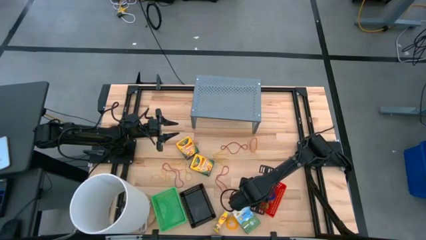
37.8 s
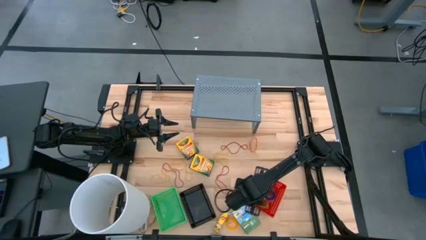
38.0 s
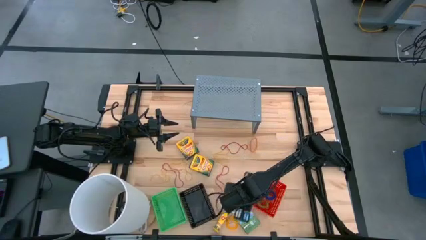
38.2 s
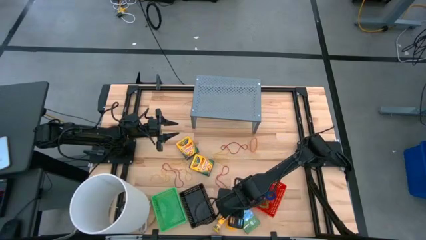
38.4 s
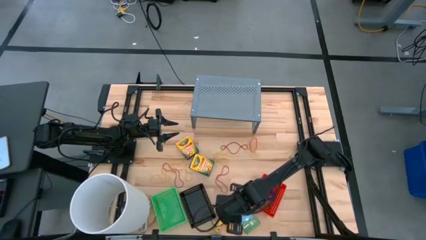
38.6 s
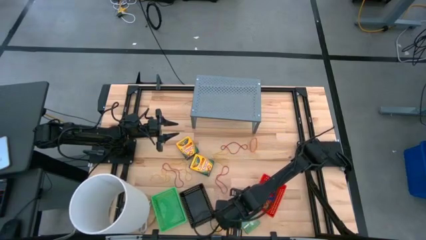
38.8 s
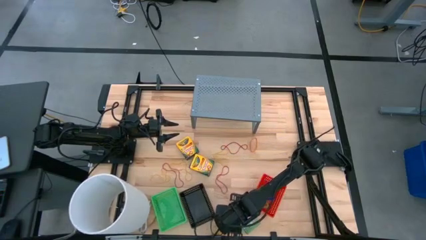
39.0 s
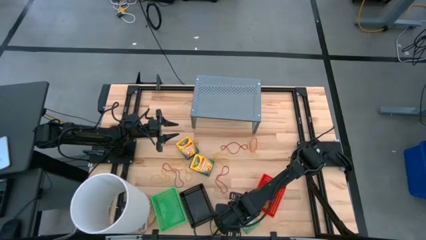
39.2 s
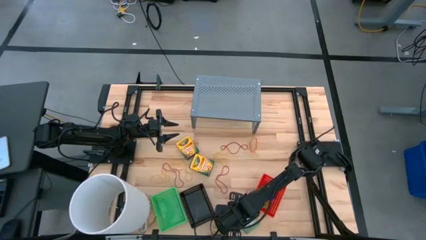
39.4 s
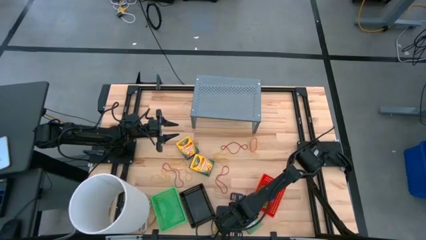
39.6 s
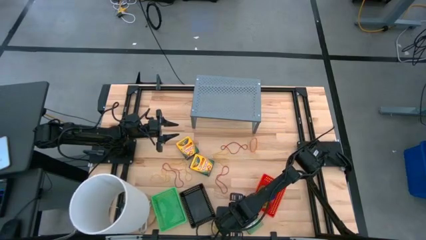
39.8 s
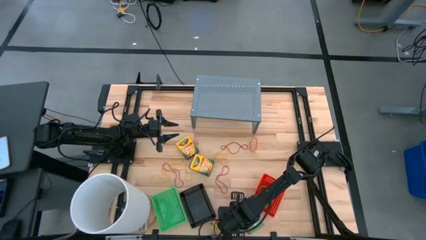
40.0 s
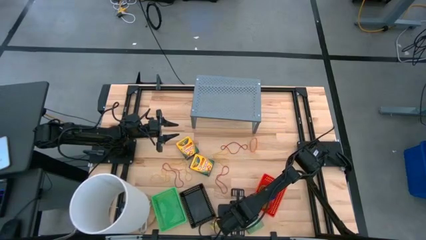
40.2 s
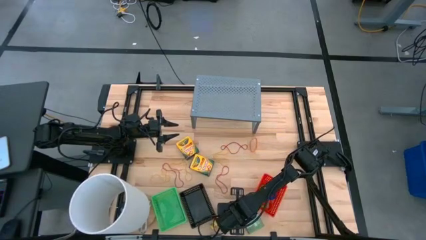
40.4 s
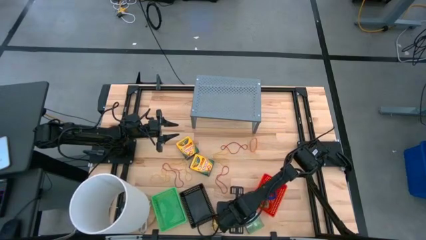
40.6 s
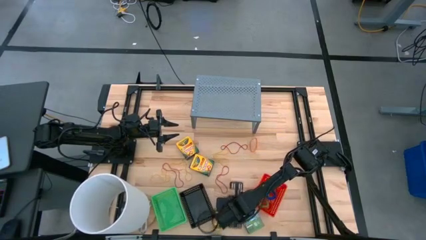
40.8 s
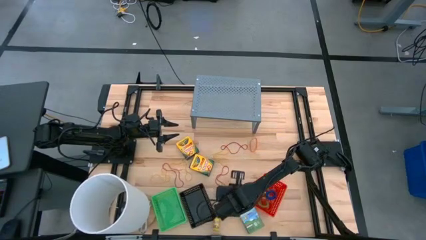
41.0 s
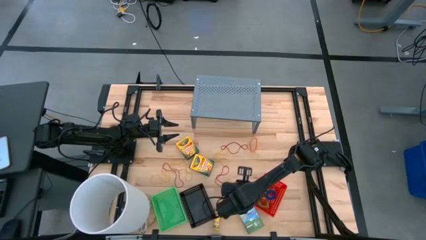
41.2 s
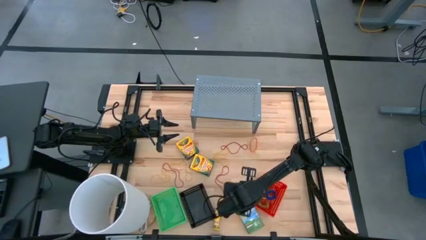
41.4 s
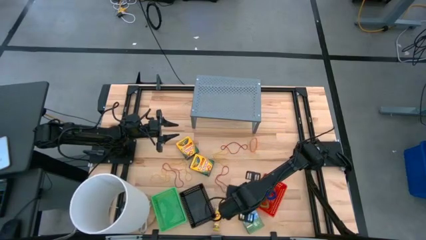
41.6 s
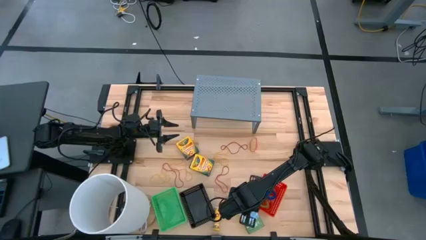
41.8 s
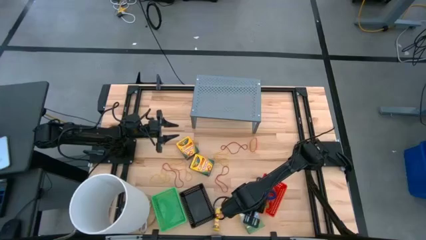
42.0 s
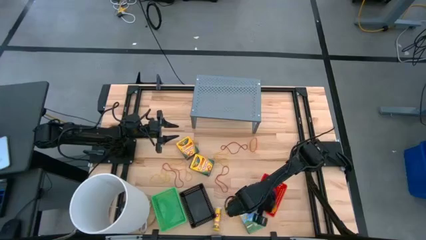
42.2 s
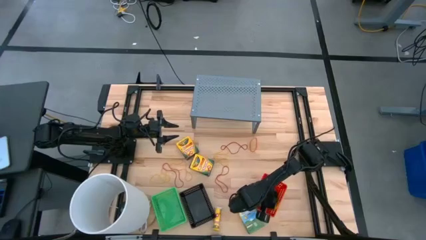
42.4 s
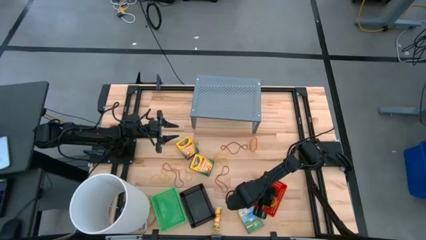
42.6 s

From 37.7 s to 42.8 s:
Task: Pick & Place Office Desk Supplies
Put the yellow spring keychain into the red bin

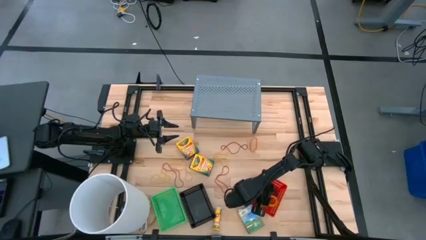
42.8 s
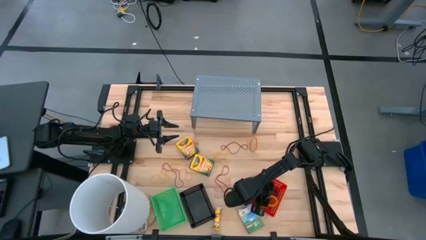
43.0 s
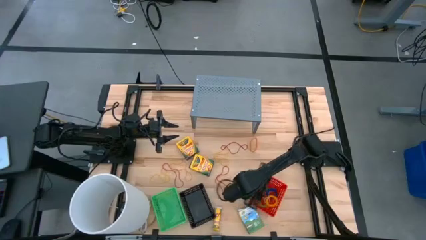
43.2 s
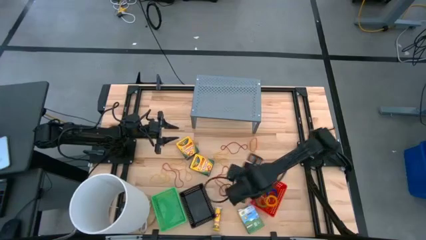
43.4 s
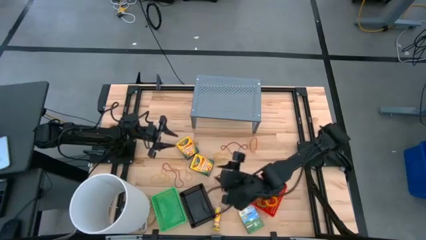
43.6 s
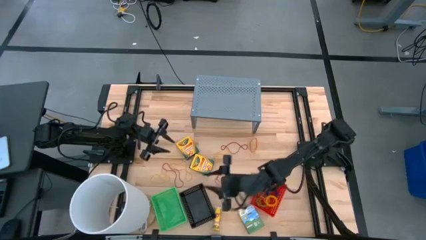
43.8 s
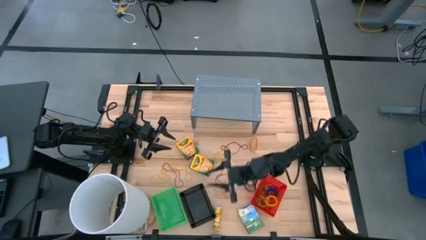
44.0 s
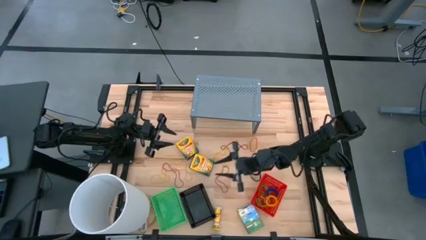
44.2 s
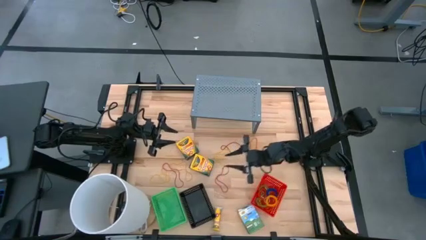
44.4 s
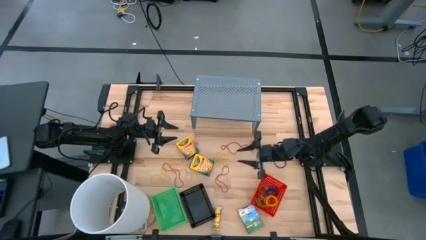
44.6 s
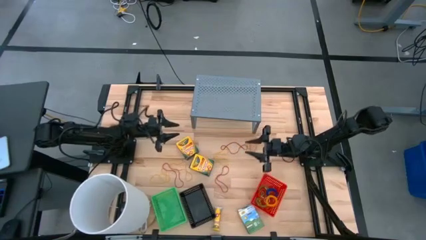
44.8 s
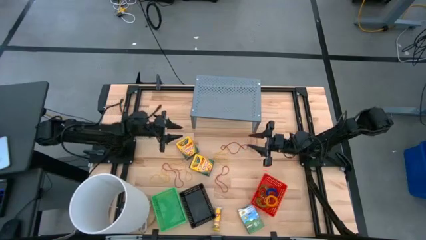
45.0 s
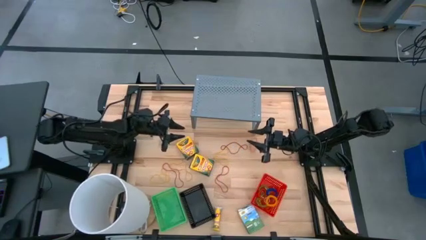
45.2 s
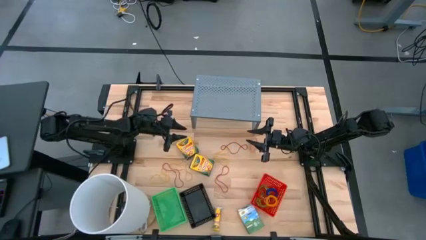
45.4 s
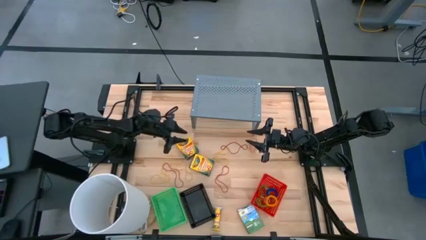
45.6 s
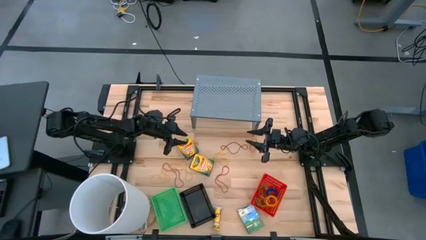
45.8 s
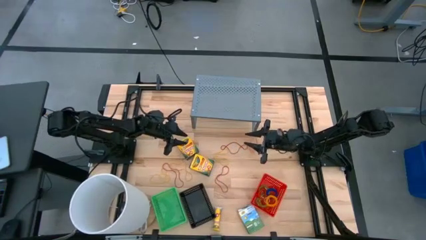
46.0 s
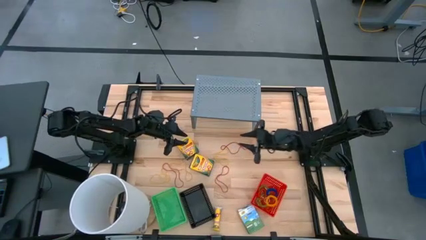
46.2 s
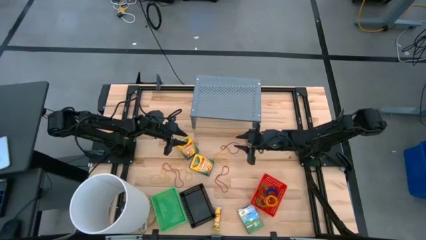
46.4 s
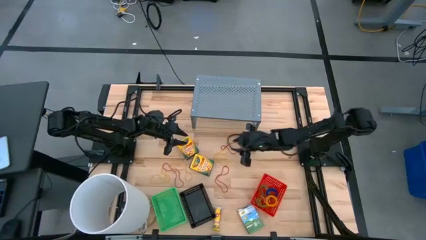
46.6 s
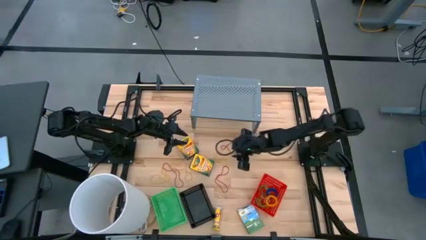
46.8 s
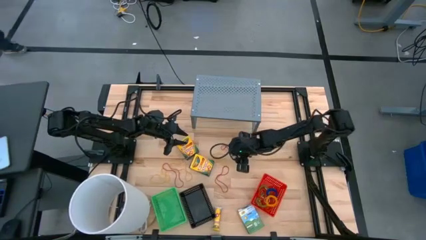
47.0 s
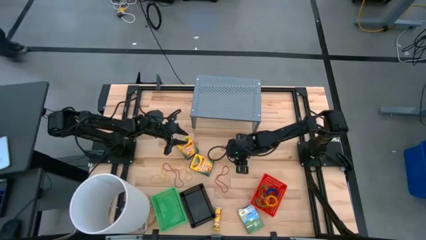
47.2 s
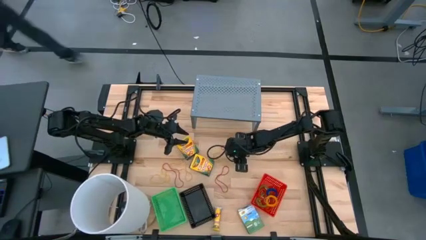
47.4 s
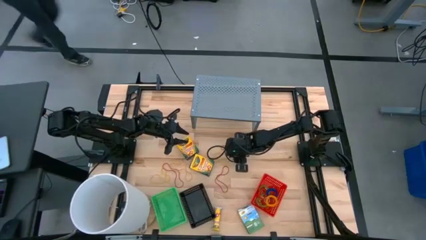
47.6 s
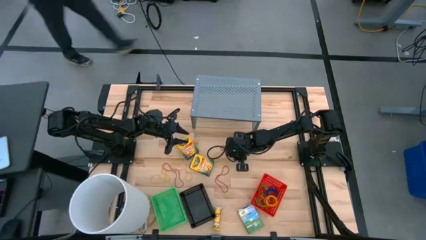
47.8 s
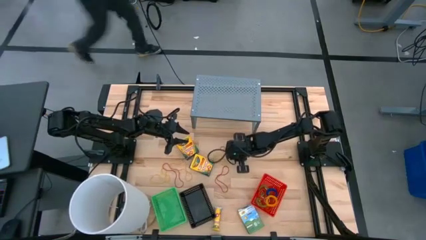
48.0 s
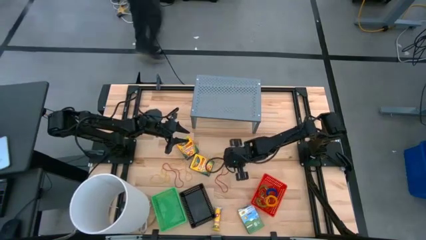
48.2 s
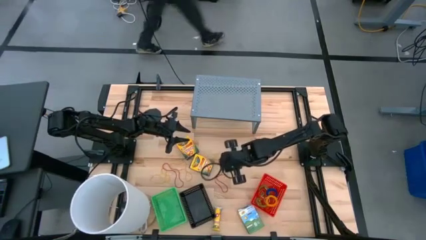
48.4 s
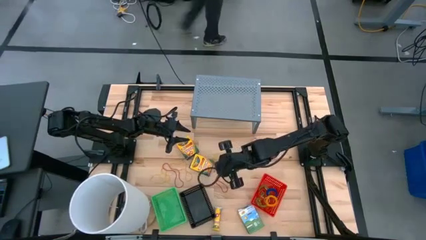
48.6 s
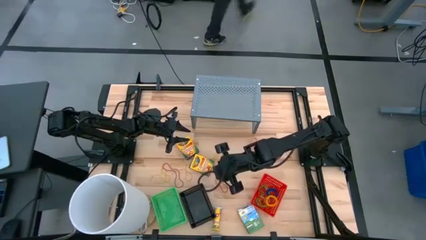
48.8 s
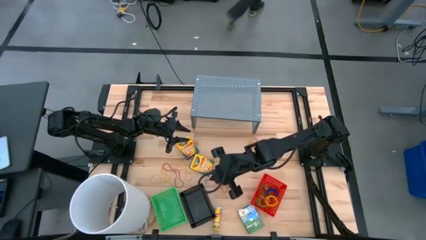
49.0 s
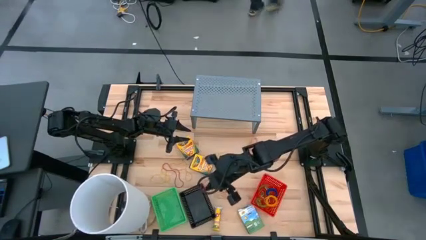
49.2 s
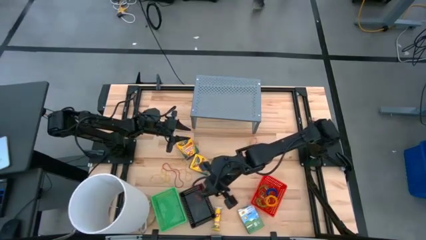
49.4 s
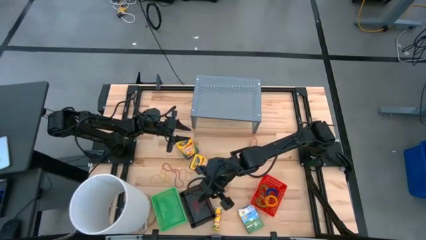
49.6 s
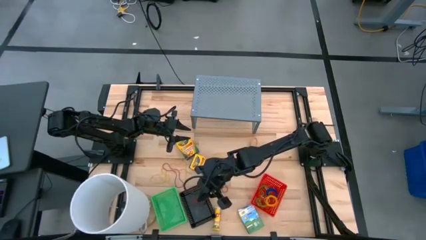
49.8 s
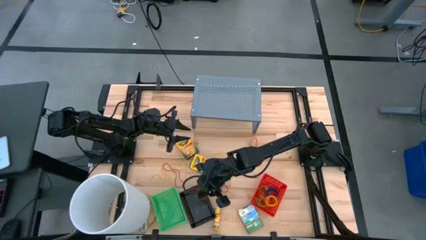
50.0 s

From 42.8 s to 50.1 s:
Put the red rubber band into the black bin

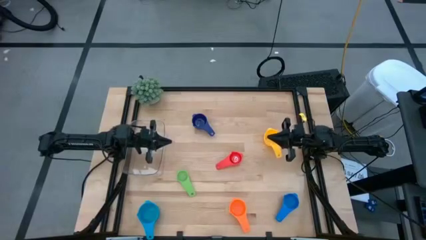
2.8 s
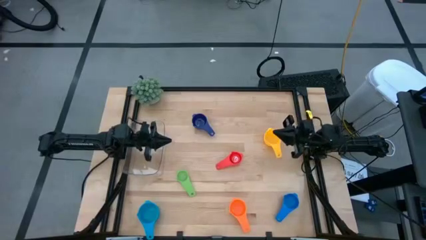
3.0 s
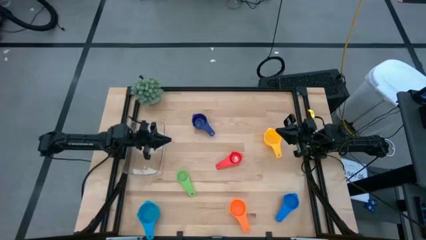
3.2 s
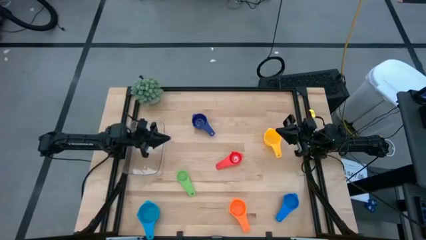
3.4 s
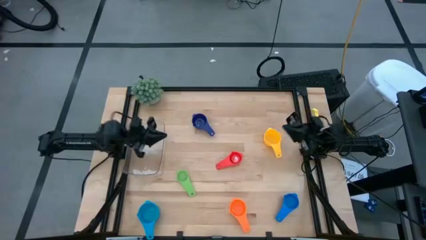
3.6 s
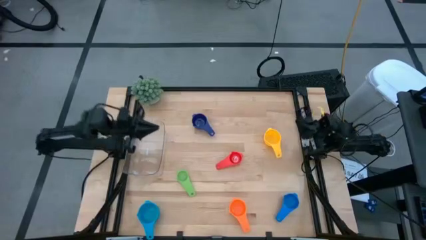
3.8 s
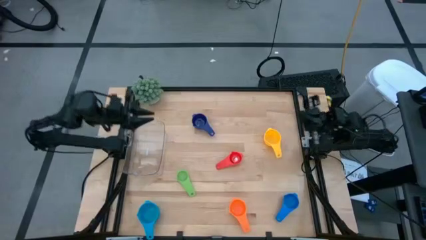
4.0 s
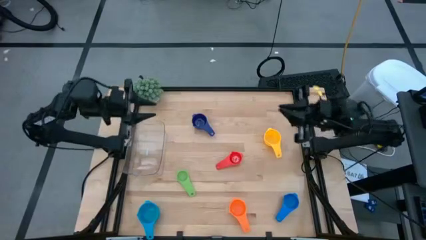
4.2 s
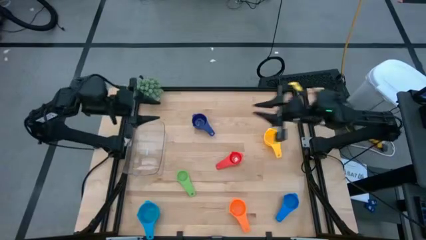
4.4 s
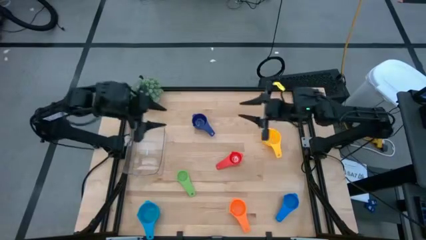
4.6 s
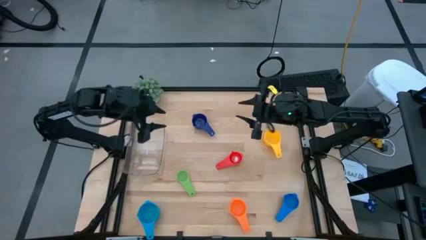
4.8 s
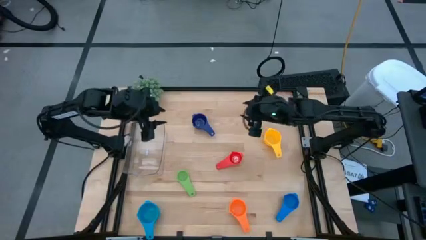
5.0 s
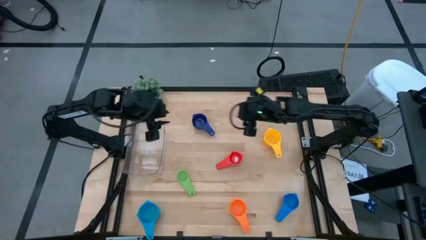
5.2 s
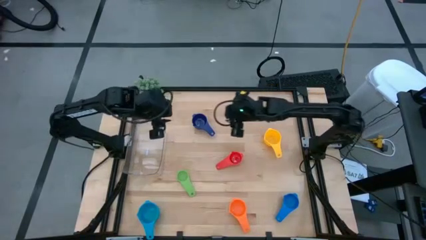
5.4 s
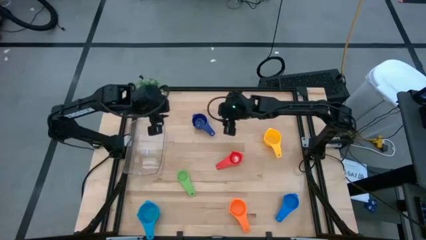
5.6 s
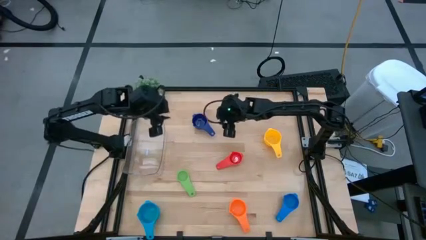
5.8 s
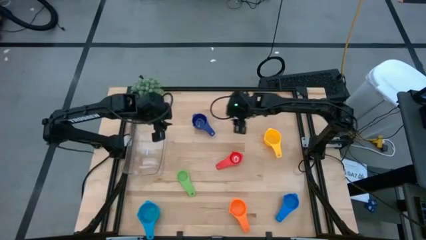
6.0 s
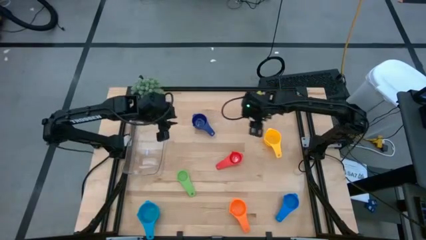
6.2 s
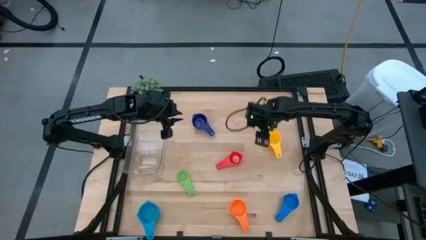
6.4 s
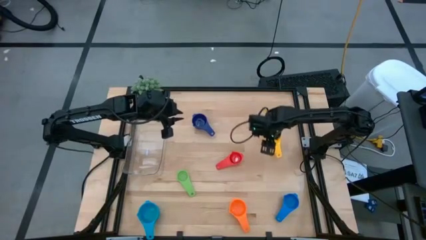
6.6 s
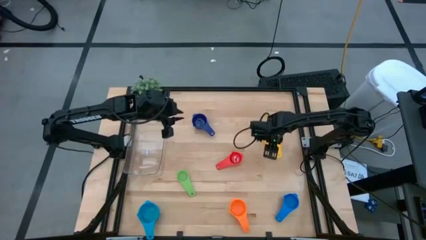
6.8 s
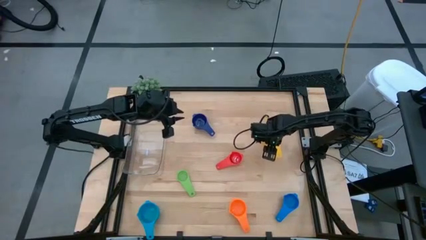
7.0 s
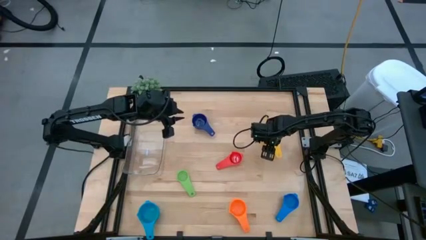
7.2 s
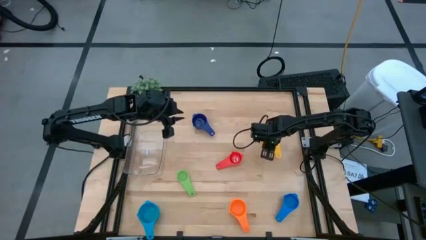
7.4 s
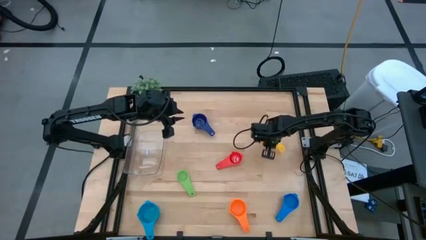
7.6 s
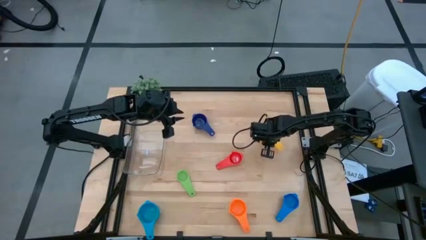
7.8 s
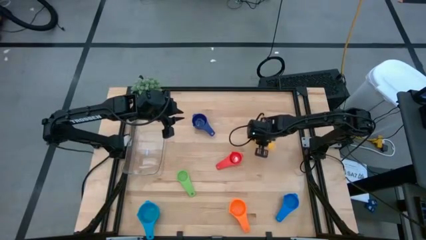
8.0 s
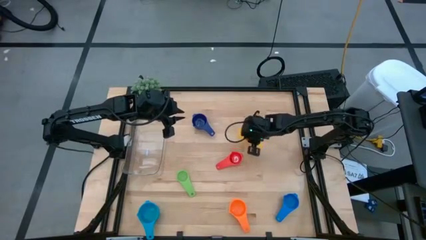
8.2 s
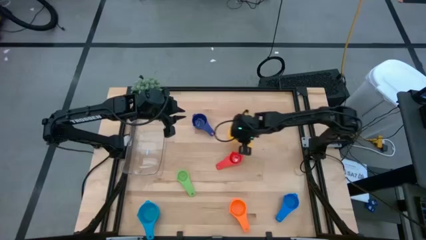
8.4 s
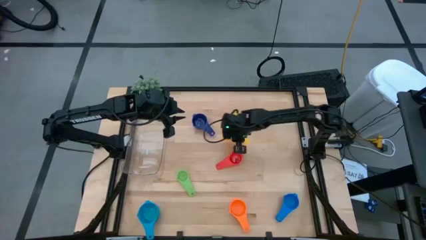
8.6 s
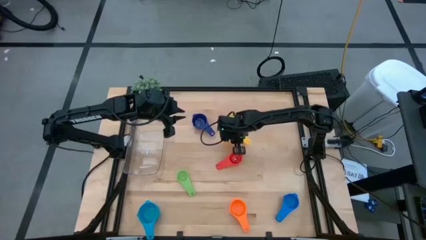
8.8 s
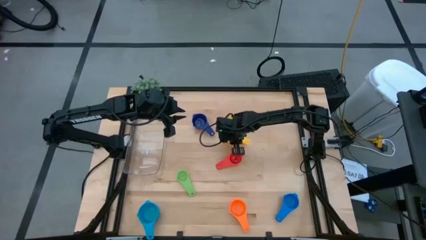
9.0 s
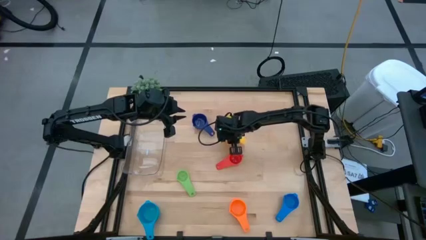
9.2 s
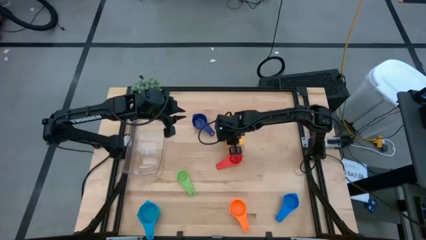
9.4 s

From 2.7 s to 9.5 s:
Task: Nest measuring cups in basket
Move the yellow measuring cup to the top center of the table
